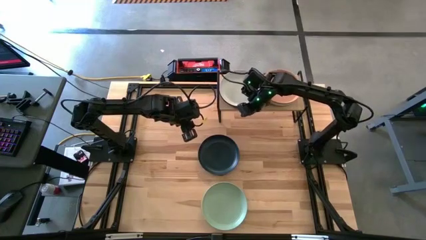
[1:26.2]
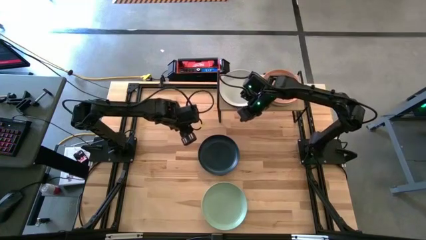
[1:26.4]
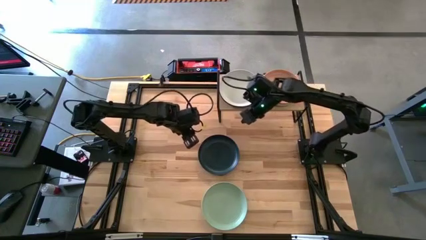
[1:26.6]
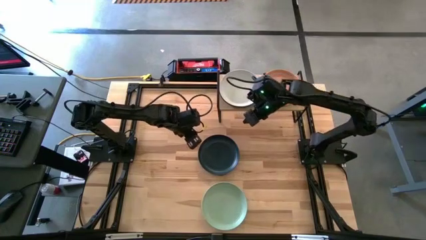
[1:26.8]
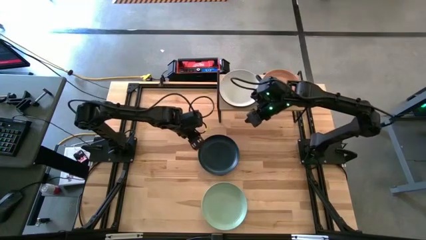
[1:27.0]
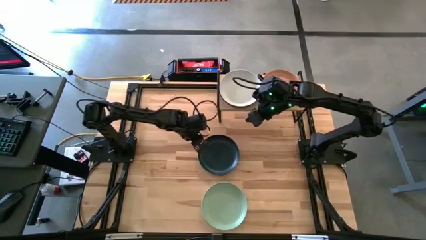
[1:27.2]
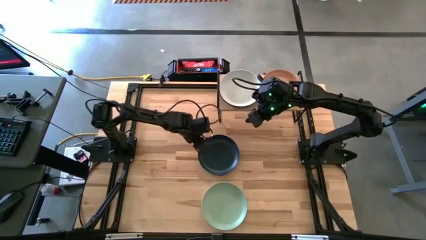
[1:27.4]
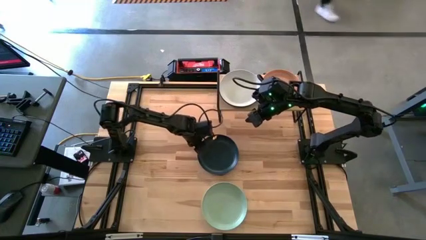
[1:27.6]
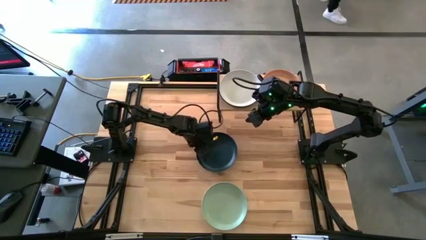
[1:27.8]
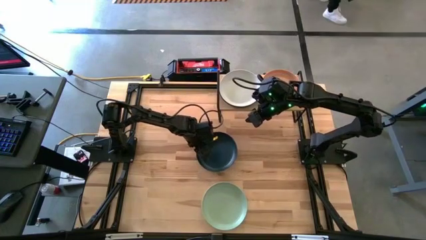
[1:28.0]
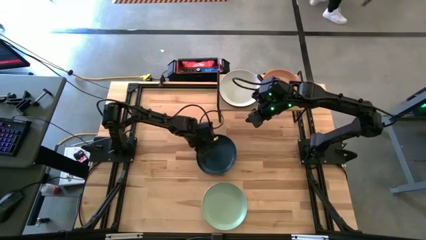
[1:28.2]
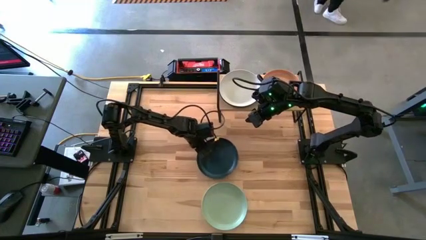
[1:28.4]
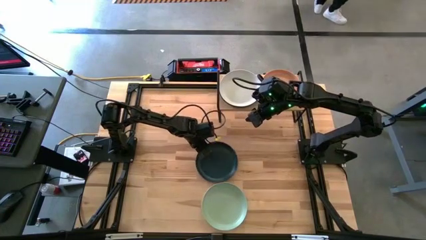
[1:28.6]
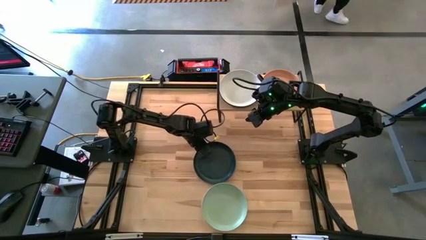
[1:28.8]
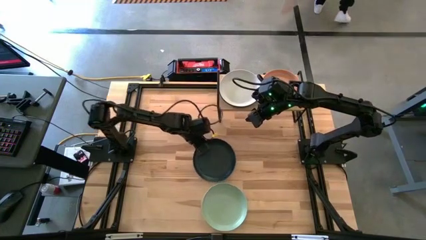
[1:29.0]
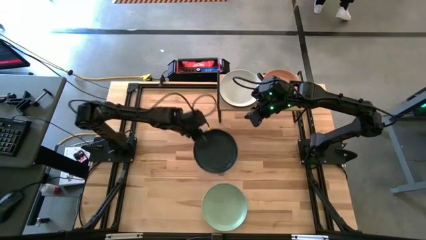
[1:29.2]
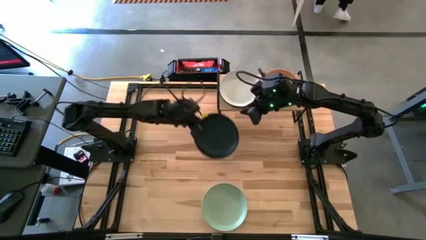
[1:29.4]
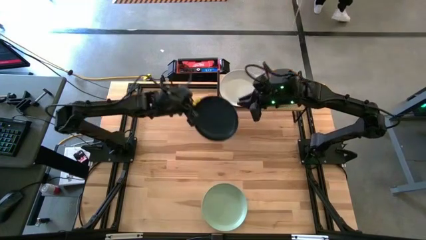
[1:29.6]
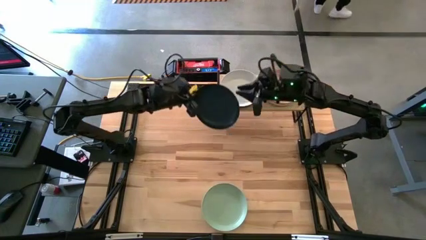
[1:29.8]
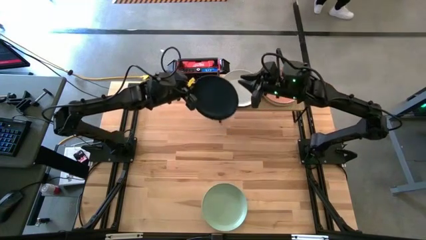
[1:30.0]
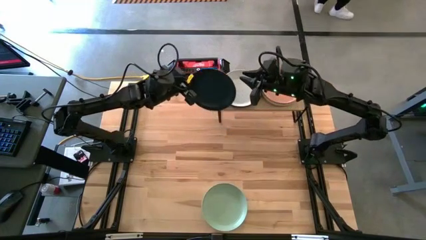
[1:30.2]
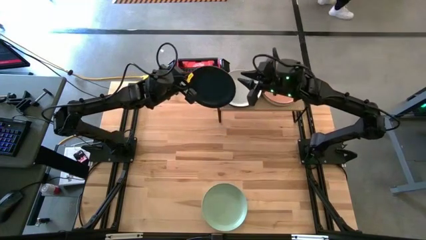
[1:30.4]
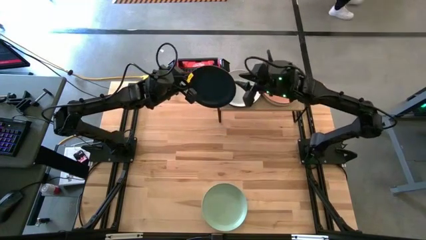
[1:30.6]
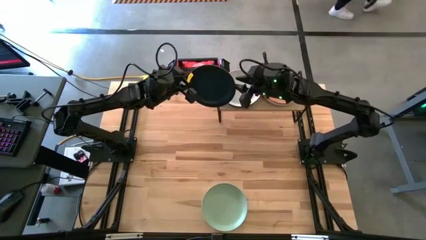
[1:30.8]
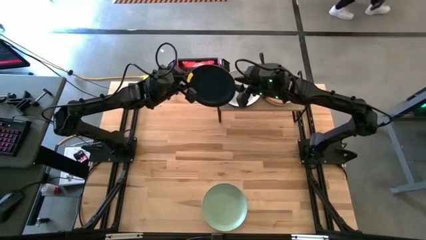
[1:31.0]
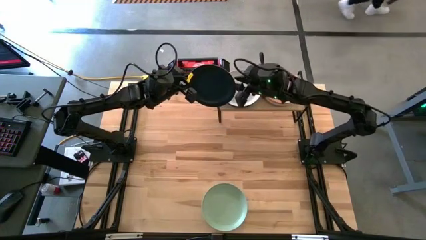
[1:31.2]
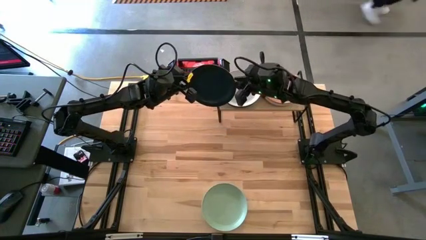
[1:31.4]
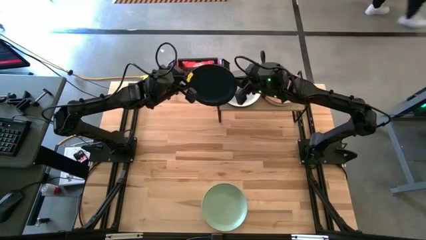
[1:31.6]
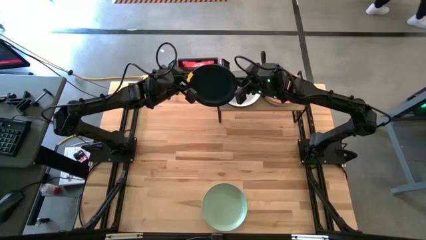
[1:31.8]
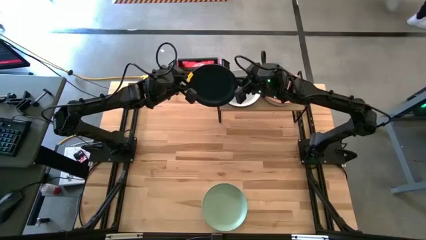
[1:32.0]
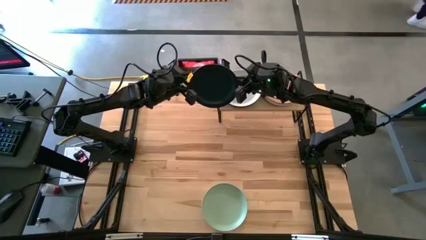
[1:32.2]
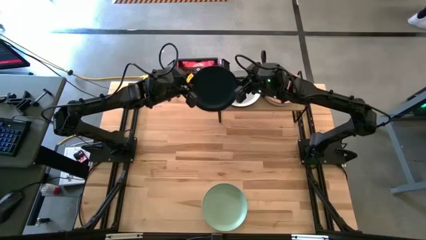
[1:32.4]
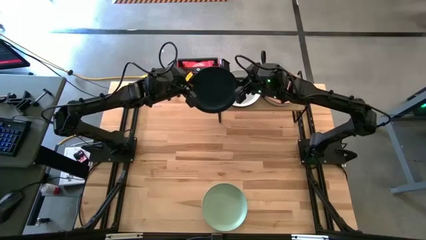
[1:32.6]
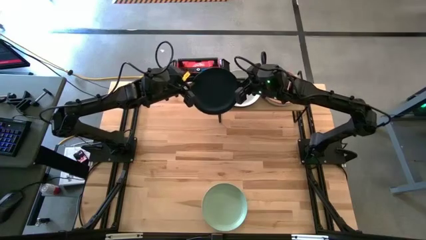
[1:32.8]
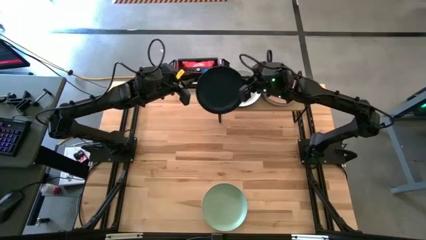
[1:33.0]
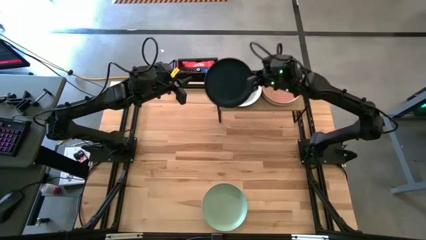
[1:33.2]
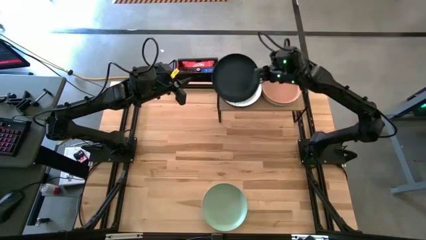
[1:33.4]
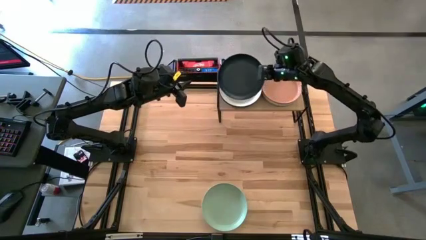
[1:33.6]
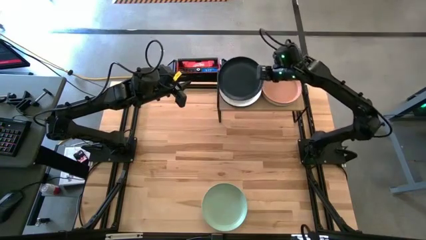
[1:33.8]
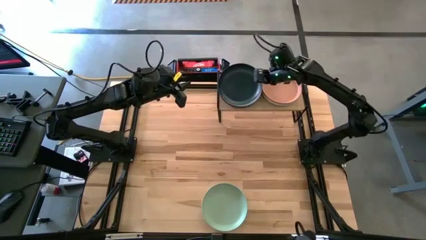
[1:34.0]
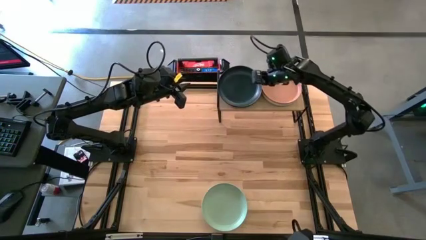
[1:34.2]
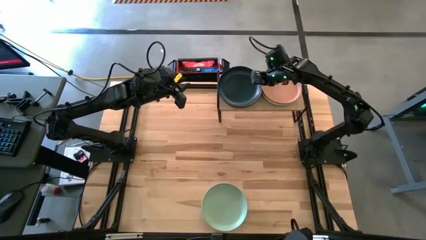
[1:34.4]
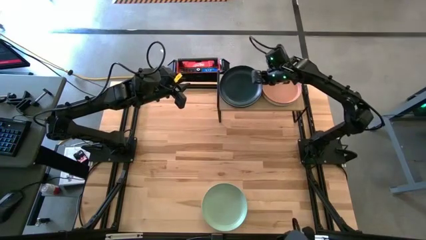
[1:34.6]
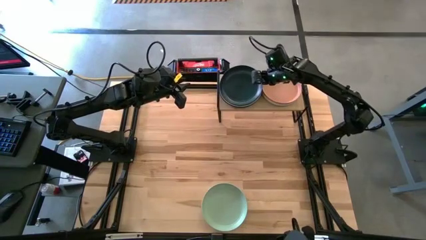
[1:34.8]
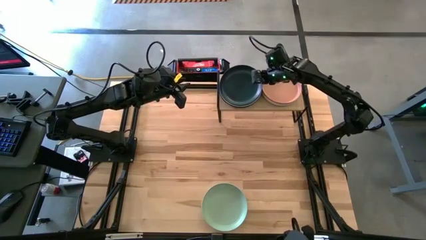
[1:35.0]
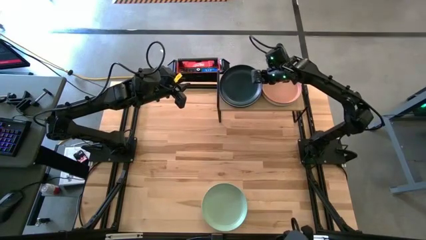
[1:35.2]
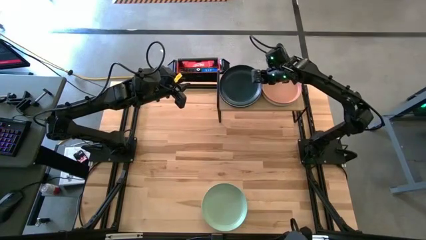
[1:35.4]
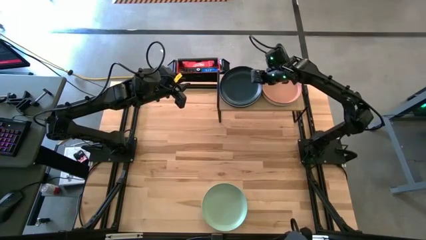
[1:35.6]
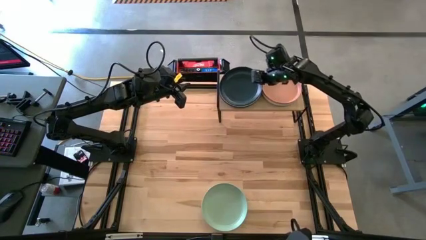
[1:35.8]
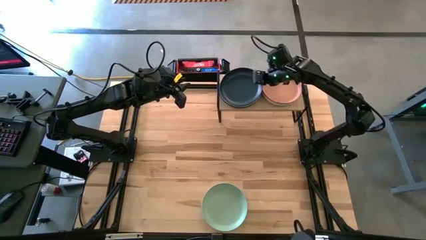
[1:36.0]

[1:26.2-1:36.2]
Task: Place and stack plates onto a shelf
Stack the black plate on top of the gray plate on the shelf

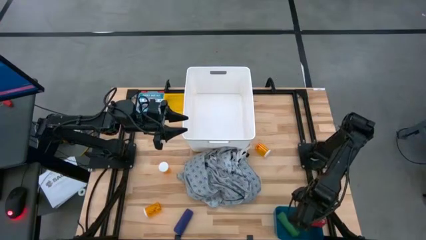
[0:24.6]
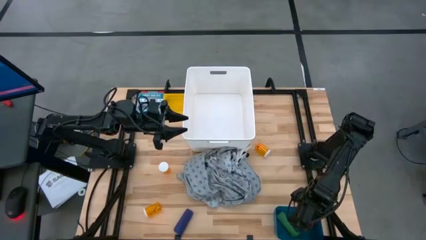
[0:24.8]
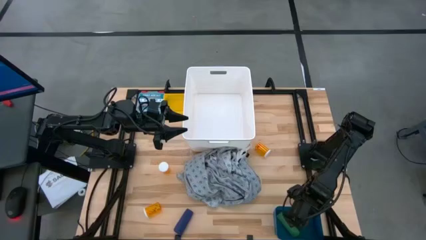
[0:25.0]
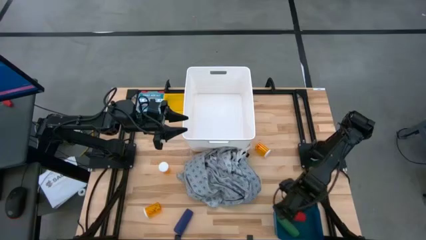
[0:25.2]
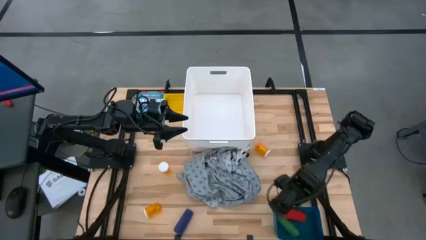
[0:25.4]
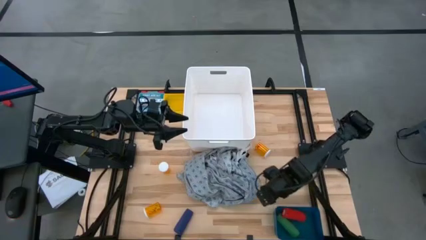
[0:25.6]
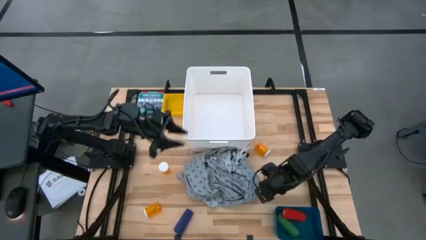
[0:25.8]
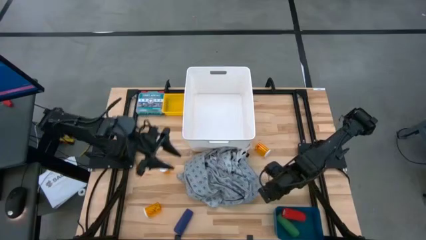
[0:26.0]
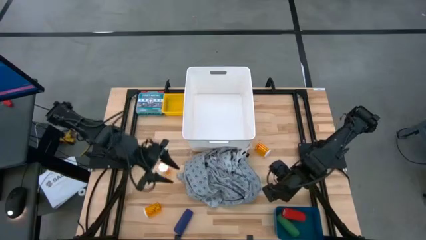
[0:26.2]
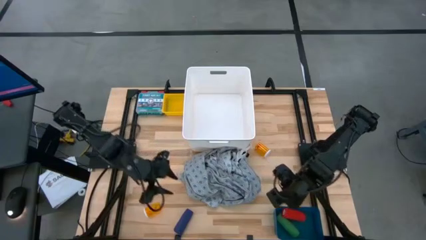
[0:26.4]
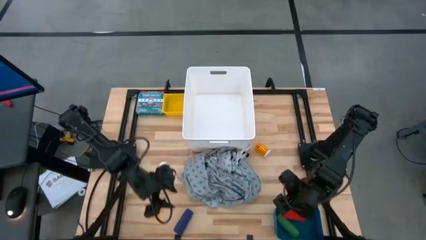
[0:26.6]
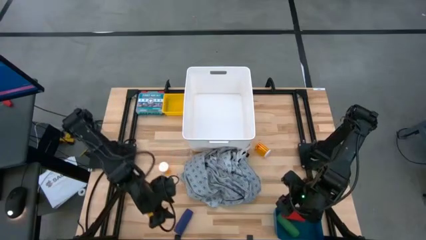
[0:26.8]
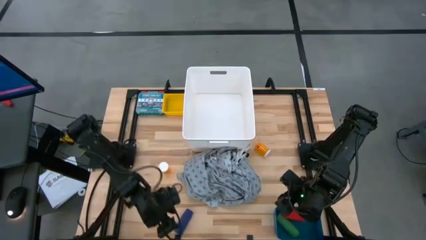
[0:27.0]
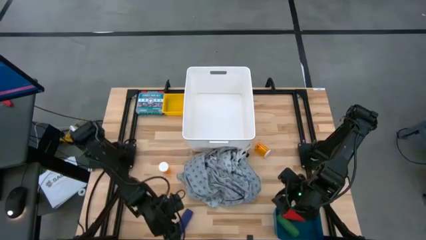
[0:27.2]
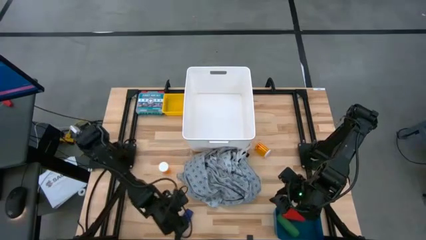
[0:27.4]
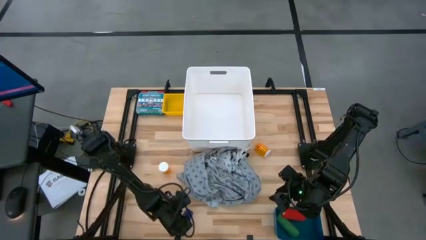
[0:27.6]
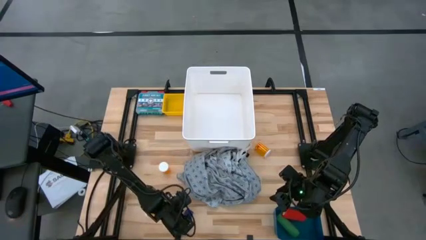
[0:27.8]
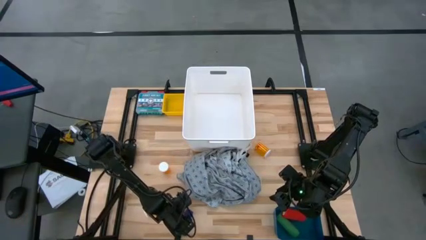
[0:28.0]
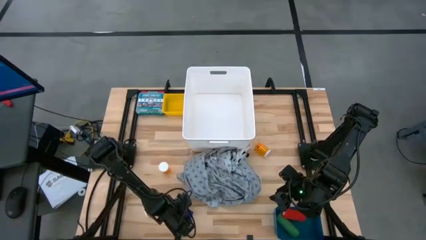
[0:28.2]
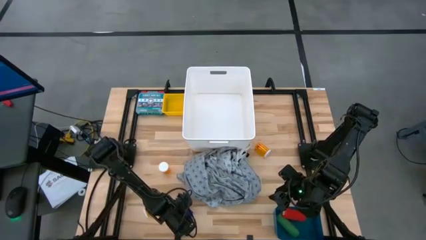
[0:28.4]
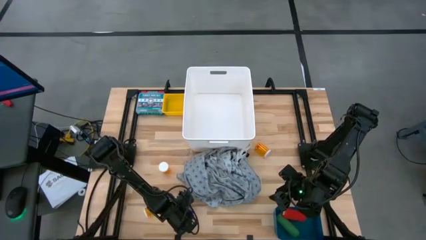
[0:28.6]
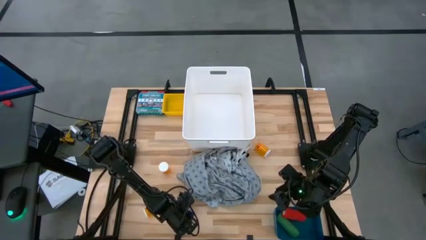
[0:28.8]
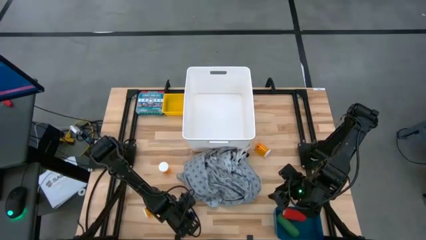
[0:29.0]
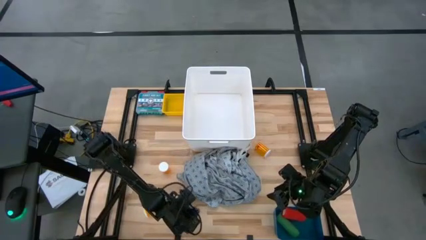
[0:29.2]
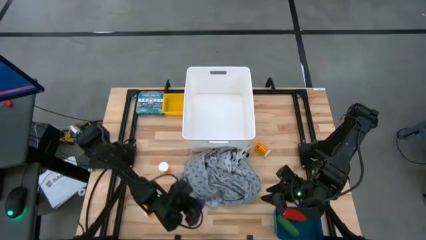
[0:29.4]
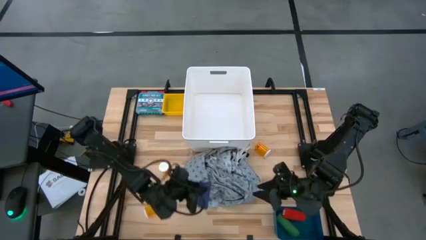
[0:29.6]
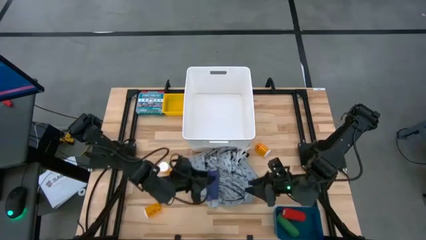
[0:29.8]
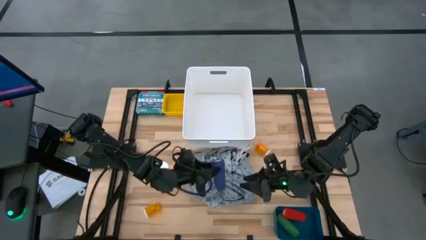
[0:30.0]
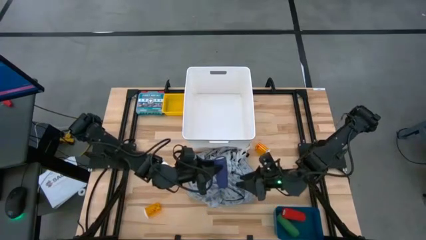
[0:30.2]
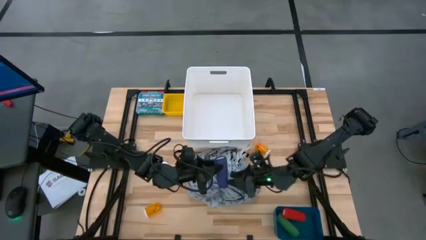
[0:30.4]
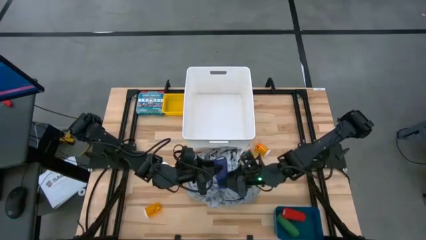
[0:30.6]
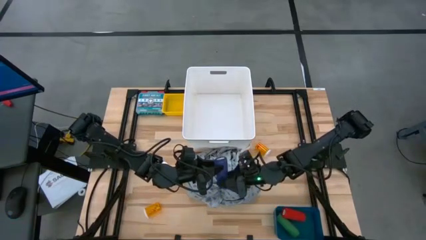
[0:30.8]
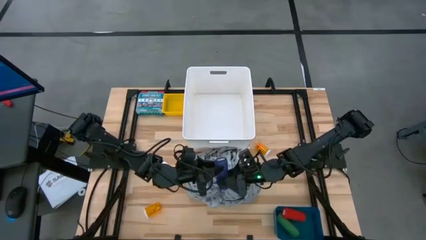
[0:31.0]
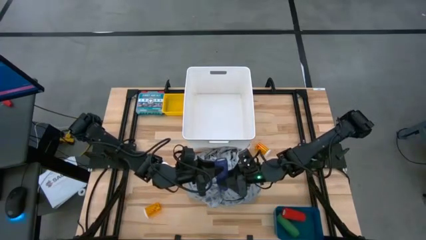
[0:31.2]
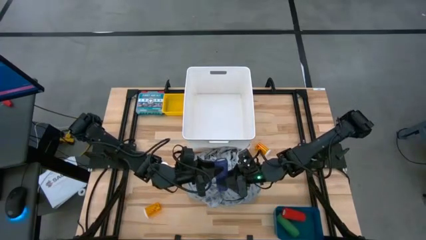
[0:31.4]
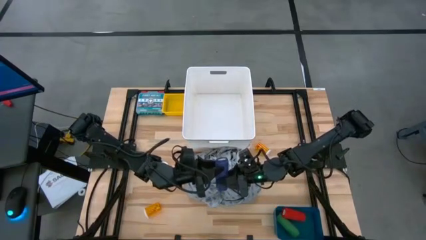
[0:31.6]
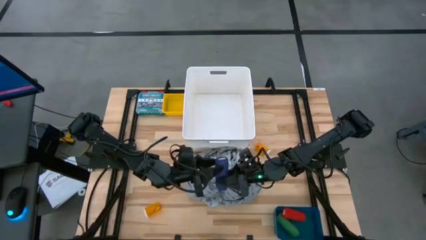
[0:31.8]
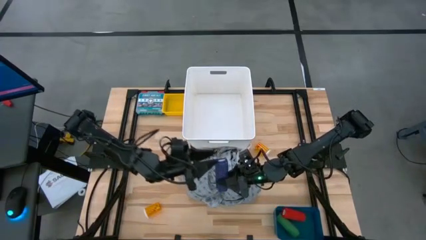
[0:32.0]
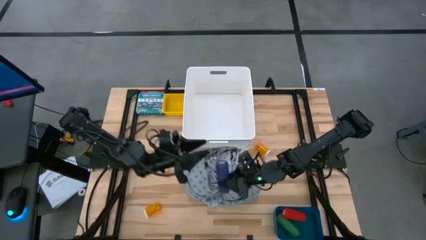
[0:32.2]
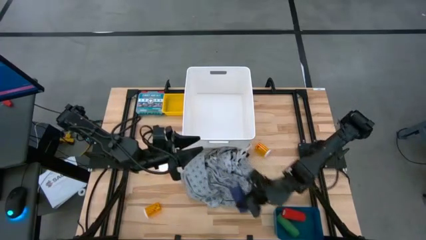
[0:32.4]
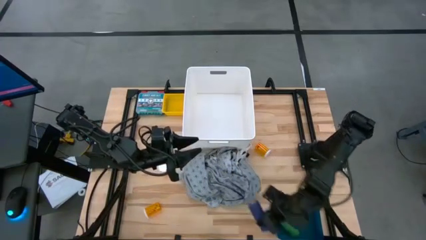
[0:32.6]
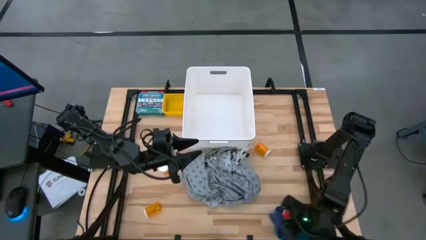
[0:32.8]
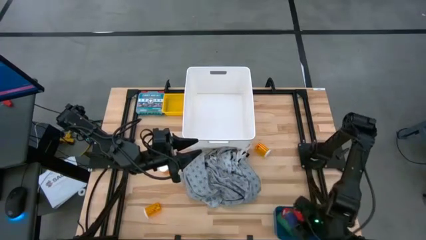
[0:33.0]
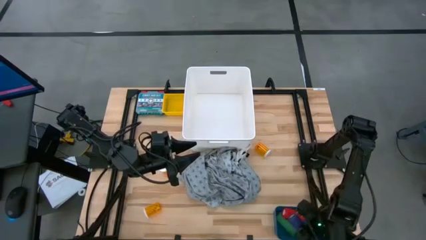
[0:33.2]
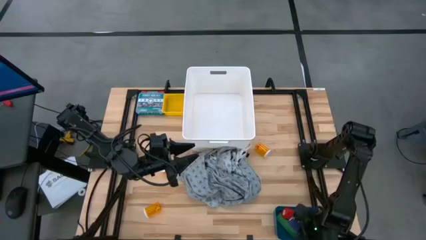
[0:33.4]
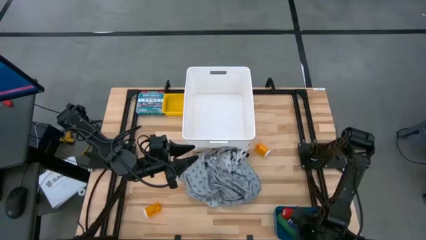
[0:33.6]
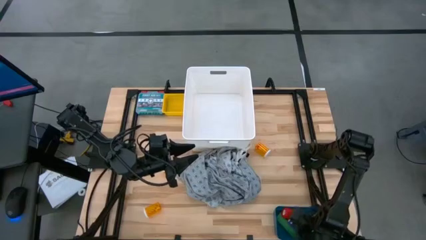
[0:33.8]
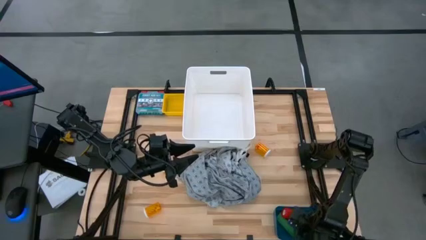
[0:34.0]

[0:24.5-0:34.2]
Task: Pick & place medical supplies in basket/bin
Put the blue bandage into the blue bin
